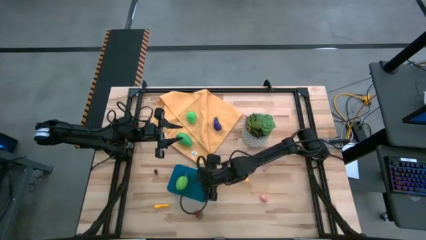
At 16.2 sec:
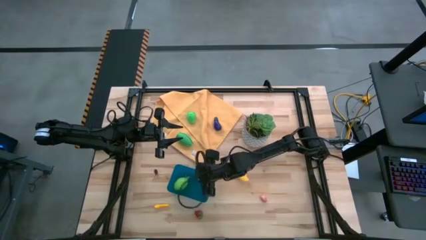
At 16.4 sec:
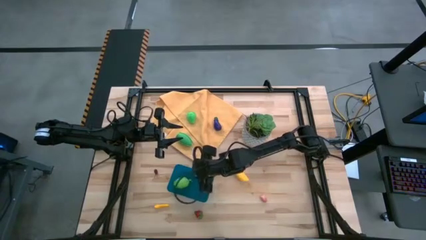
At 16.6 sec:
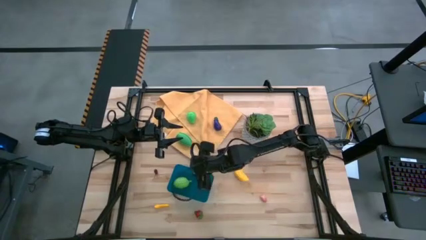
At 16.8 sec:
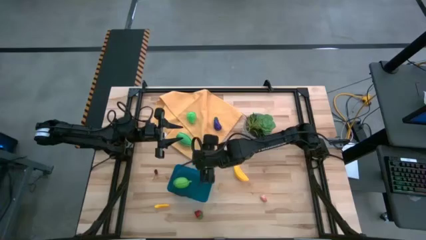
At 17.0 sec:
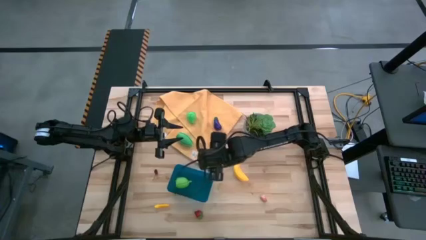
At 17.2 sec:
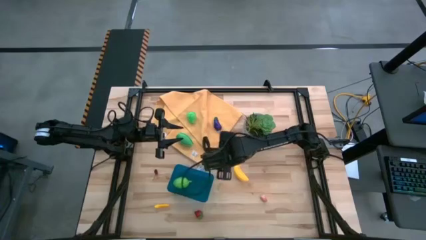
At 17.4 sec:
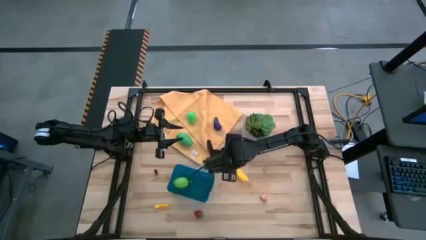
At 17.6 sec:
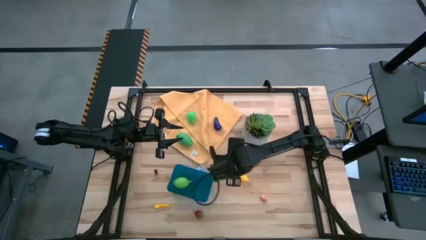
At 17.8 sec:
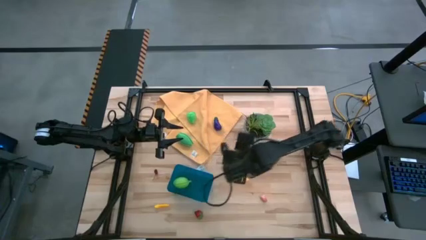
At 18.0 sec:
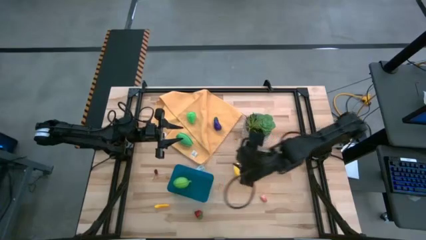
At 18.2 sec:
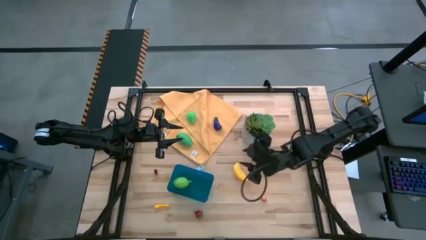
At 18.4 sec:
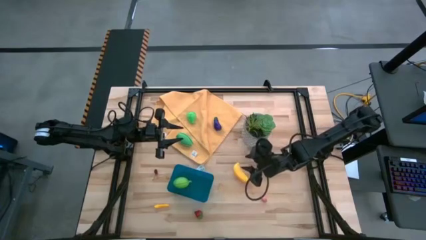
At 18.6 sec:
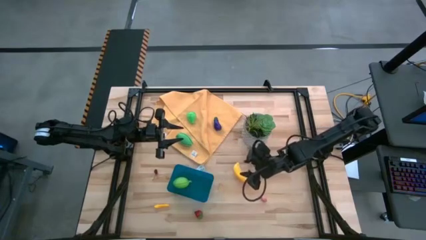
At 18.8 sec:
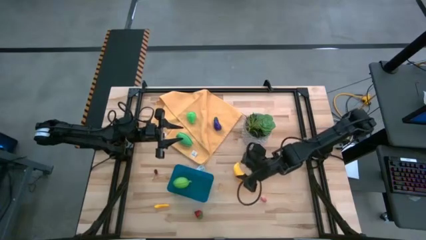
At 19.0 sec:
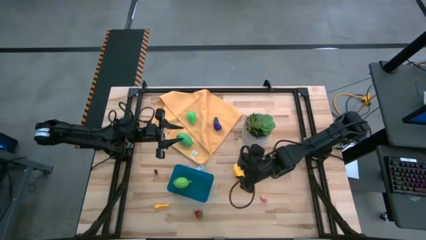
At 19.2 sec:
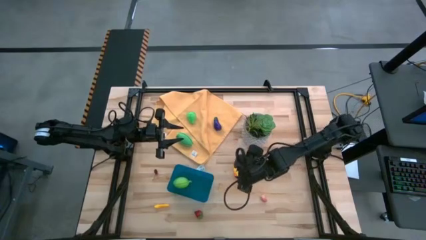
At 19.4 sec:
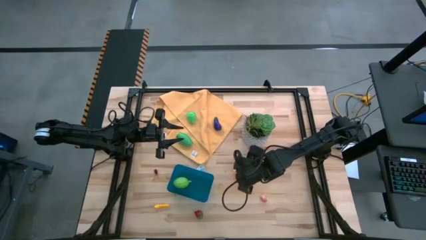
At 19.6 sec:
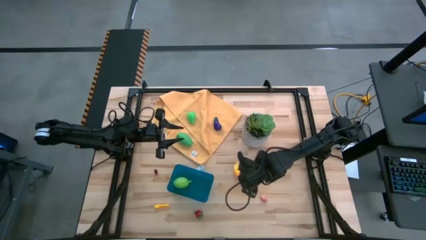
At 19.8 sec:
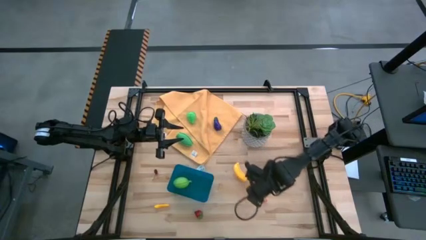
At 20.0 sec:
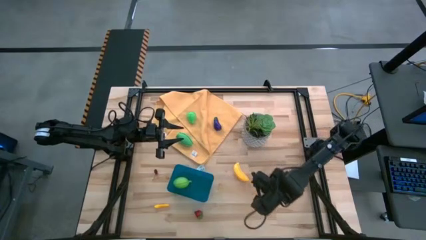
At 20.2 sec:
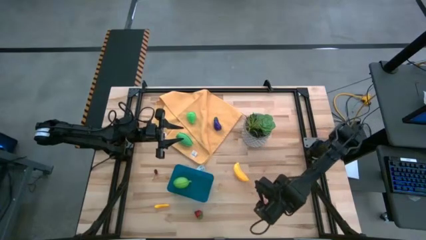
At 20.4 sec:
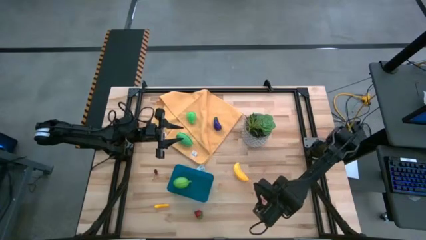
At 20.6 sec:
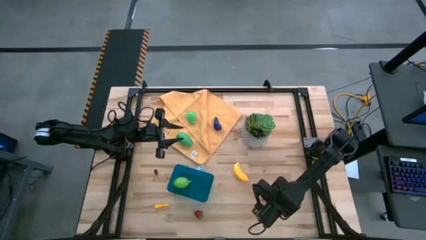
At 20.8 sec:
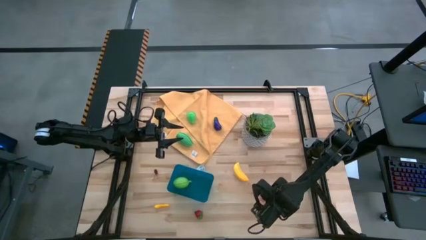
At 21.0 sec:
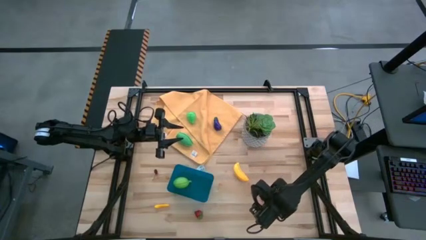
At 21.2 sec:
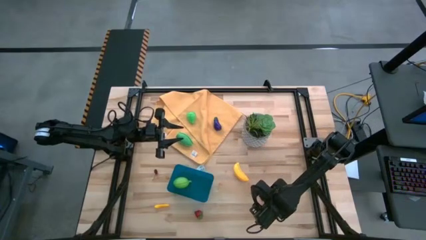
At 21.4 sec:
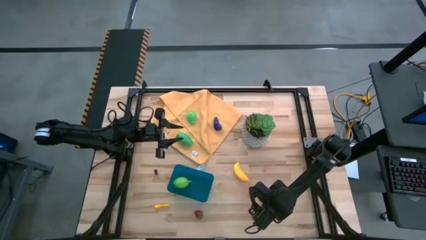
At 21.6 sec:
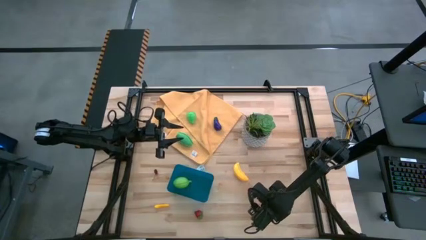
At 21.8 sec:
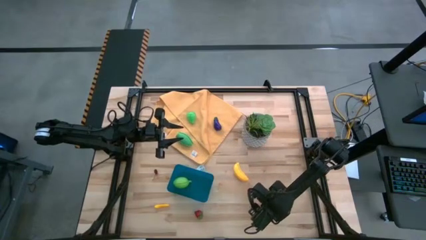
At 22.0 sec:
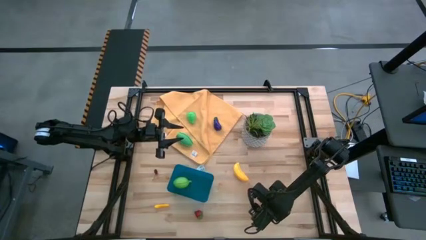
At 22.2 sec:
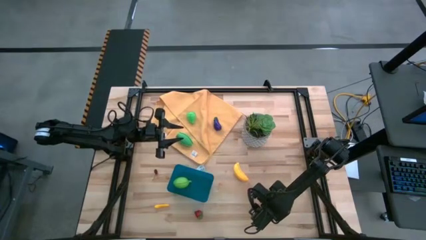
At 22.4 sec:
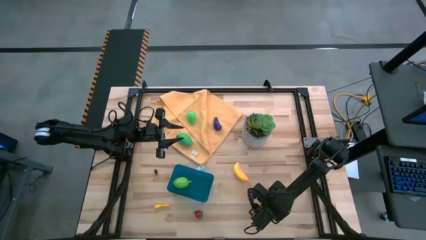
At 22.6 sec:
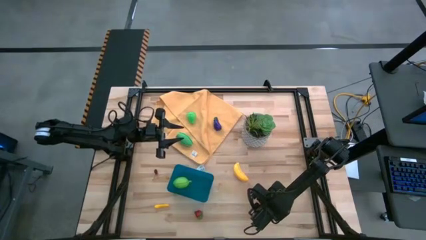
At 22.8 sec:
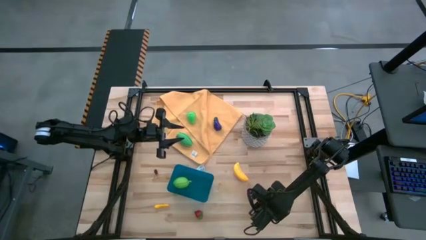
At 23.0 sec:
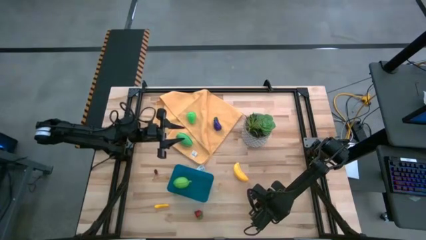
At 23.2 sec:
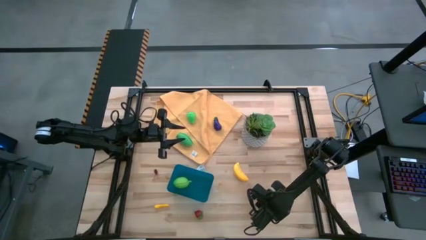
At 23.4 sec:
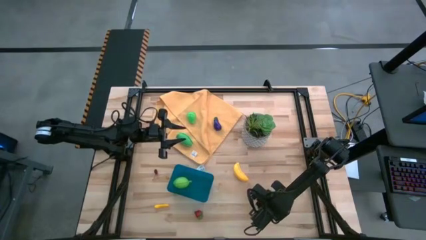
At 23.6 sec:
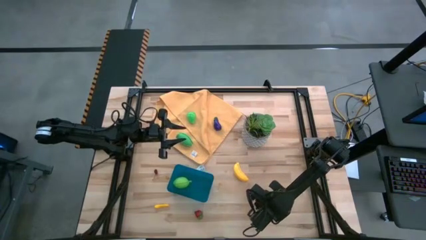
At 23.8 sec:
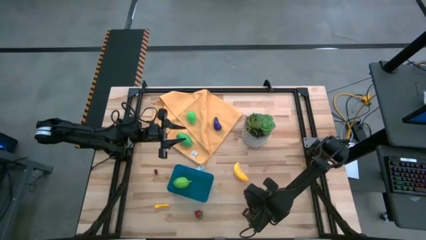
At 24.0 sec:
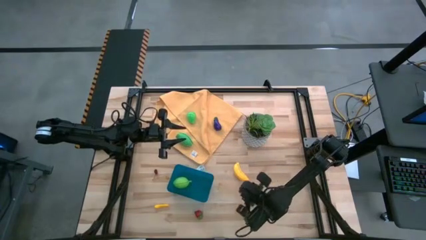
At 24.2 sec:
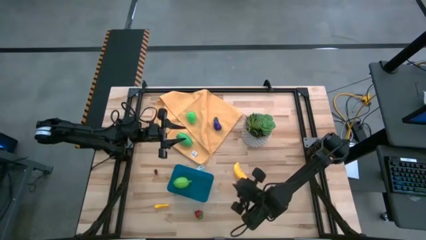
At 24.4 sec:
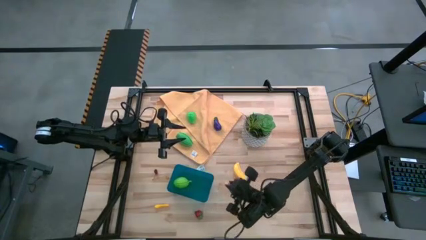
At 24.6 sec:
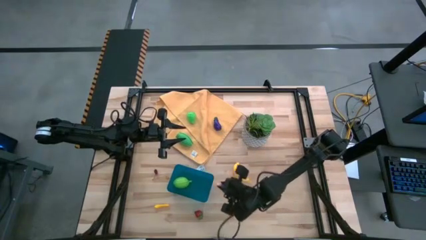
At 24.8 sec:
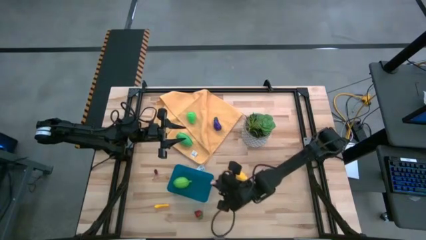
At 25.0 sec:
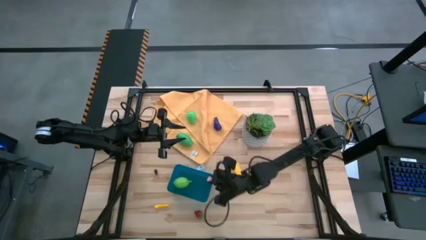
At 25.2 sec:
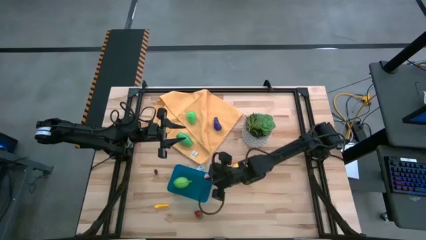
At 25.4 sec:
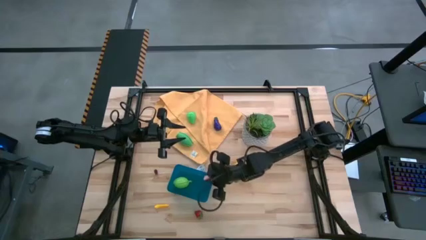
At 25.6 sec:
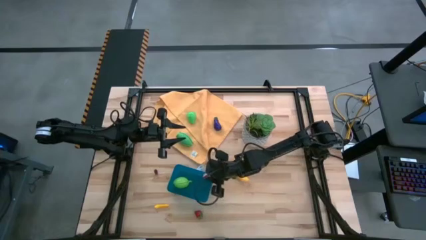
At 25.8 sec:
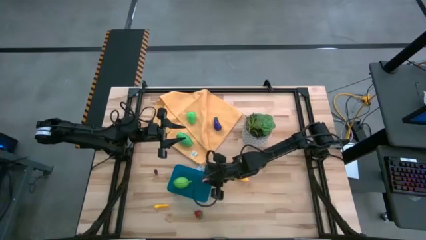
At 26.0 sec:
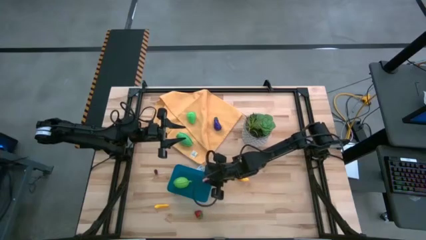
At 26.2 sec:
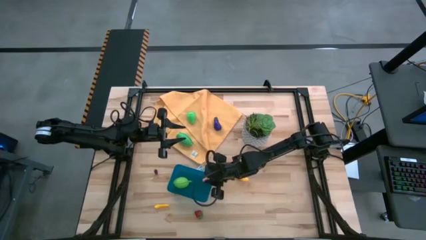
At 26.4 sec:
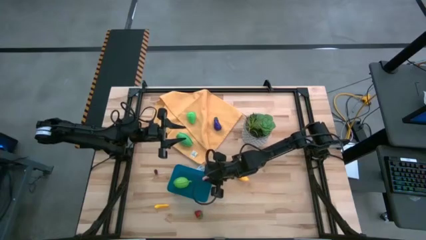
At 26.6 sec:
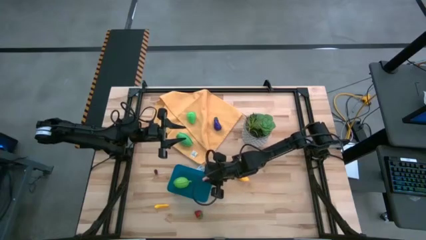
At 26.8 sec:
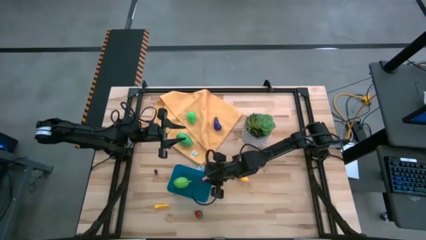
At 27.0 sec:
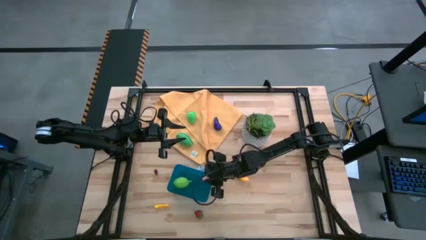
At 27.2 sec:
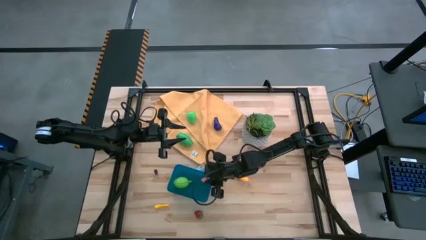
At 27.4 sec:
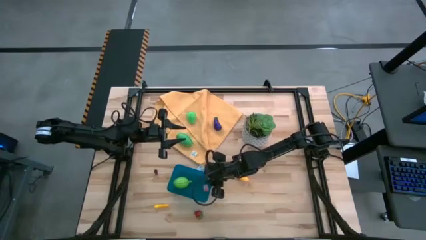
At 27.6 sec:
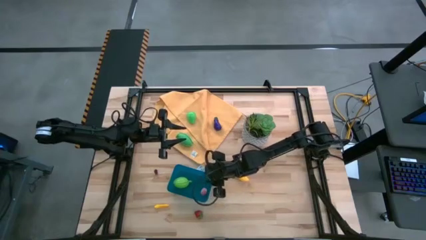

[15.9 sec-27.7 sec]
Task: Pick and placing Produce into tupperware
Put the peach into the blue bin
